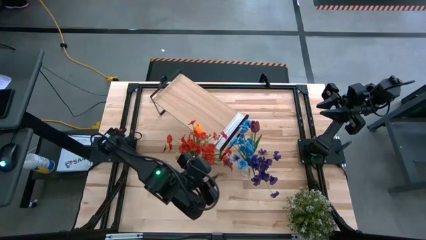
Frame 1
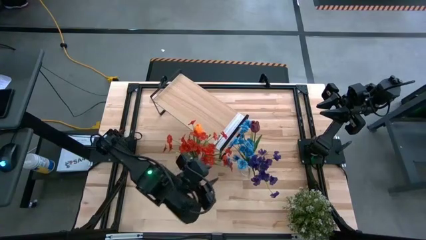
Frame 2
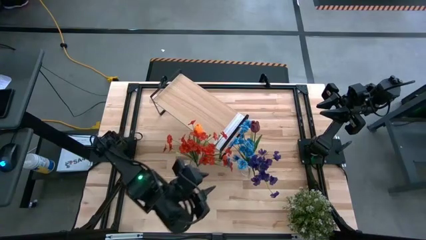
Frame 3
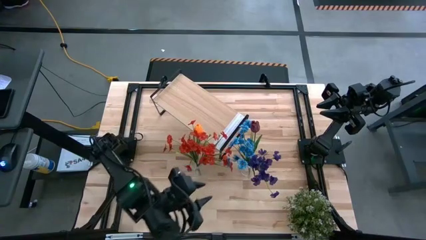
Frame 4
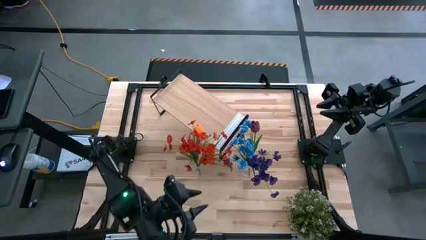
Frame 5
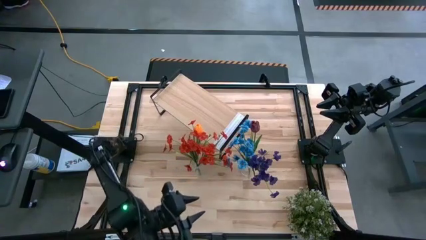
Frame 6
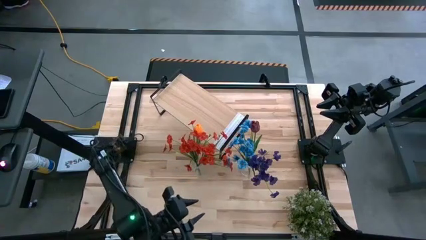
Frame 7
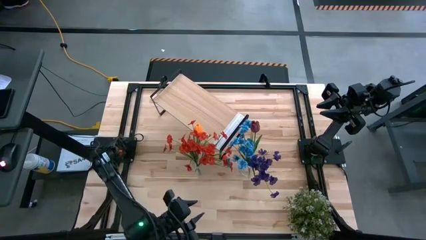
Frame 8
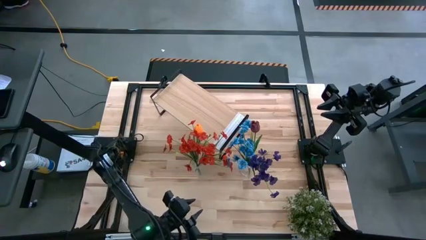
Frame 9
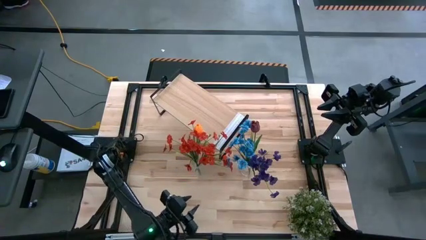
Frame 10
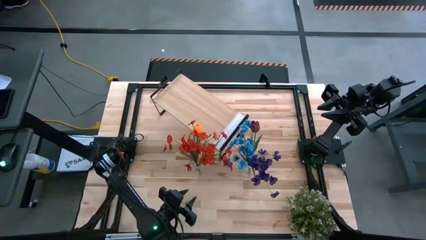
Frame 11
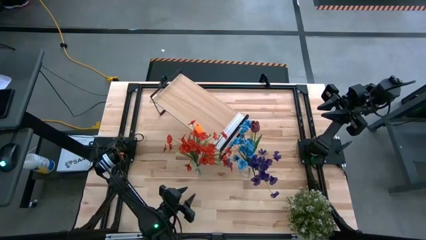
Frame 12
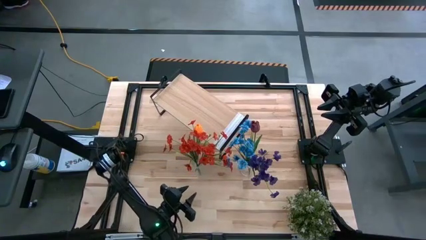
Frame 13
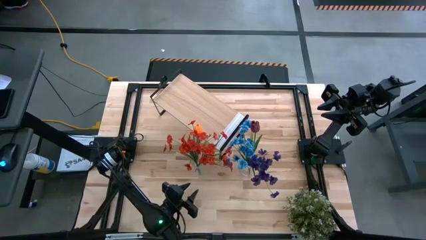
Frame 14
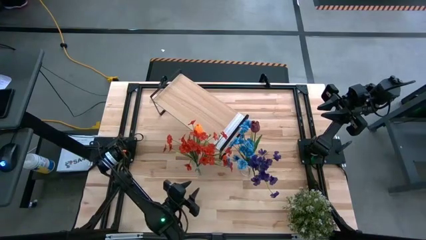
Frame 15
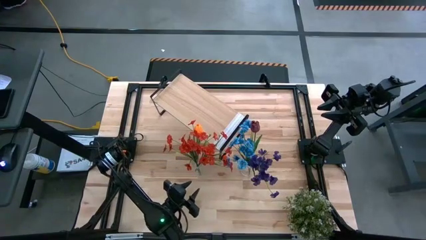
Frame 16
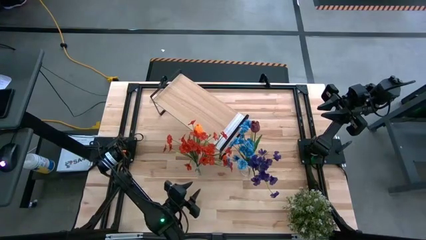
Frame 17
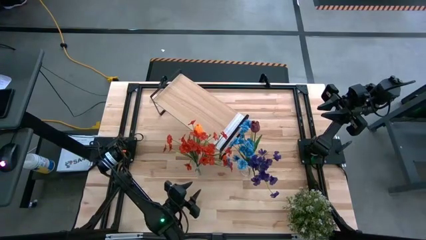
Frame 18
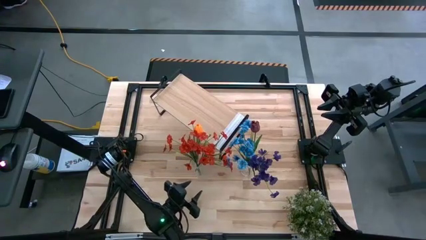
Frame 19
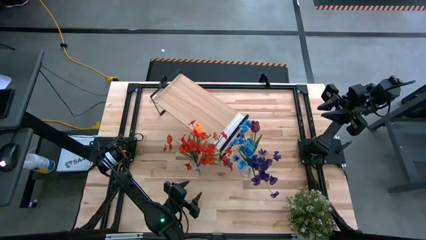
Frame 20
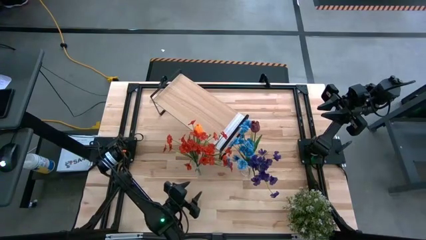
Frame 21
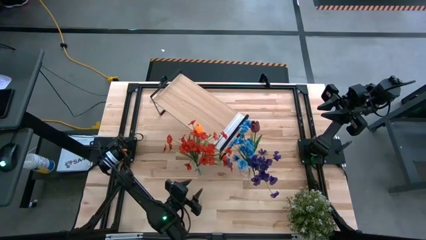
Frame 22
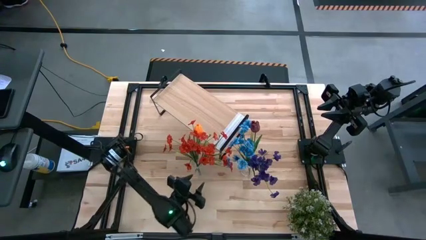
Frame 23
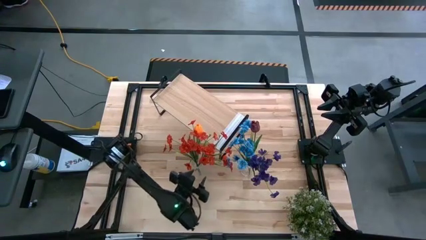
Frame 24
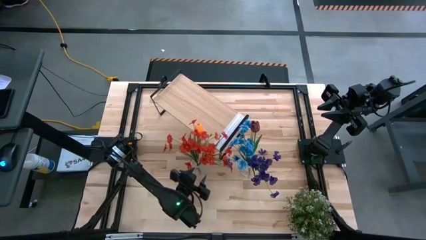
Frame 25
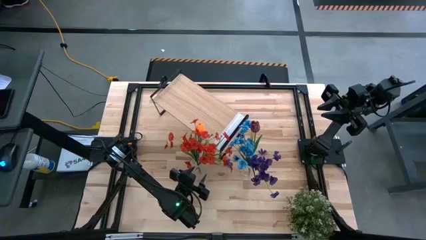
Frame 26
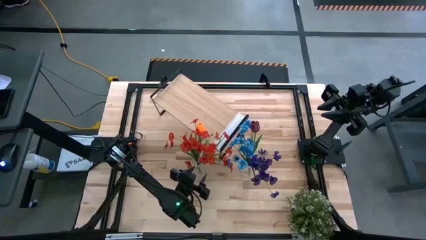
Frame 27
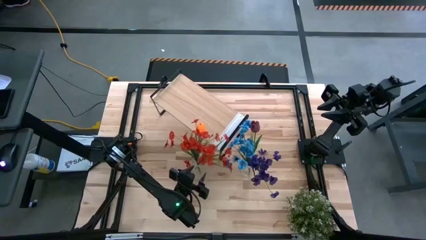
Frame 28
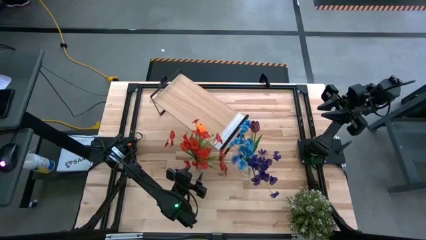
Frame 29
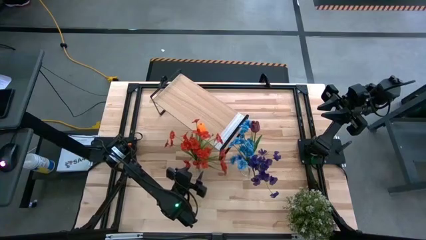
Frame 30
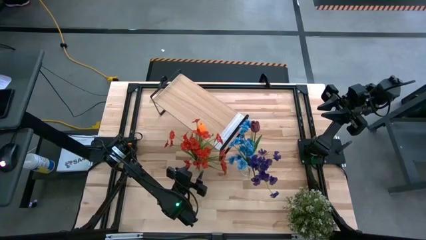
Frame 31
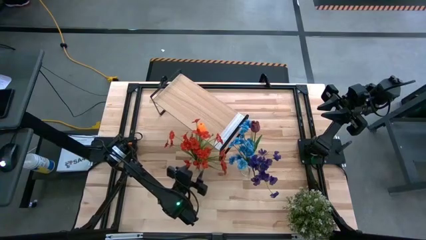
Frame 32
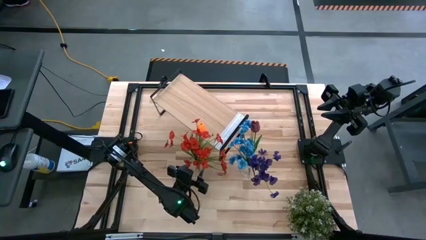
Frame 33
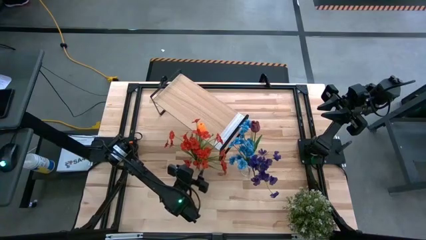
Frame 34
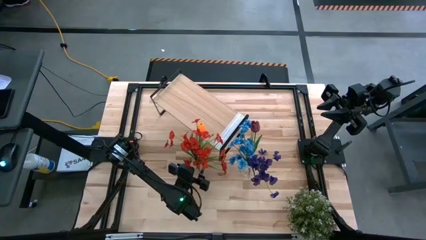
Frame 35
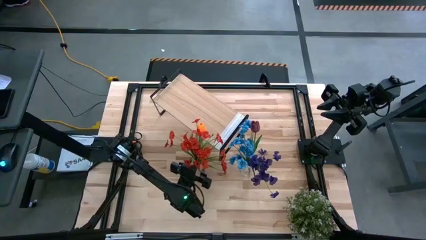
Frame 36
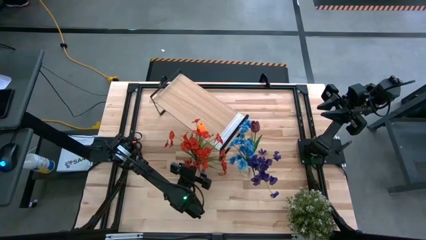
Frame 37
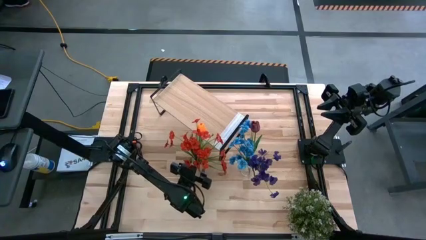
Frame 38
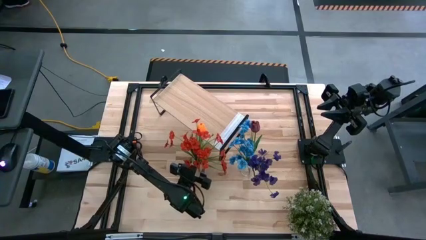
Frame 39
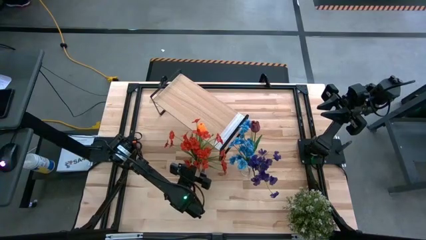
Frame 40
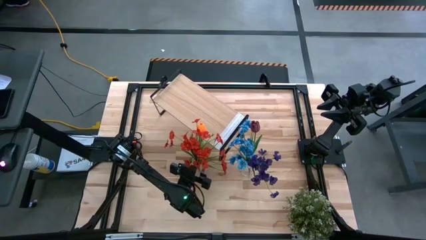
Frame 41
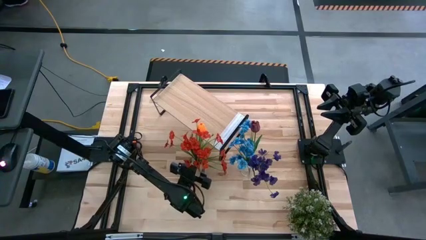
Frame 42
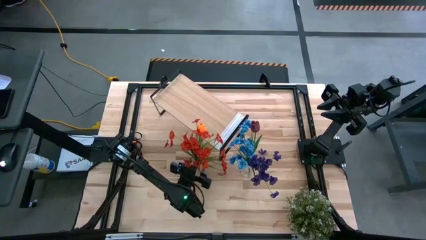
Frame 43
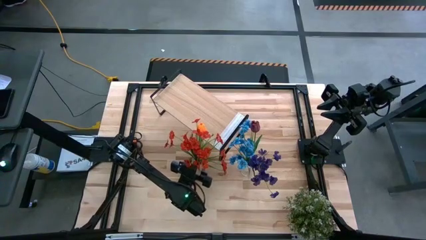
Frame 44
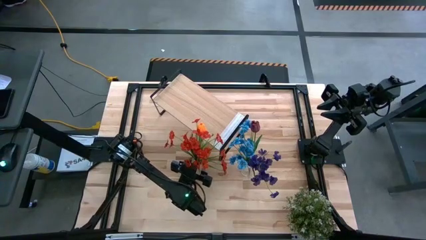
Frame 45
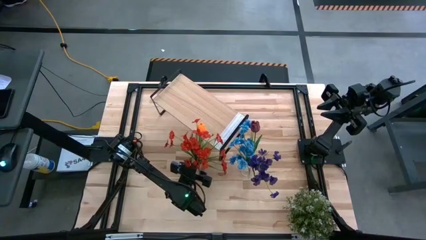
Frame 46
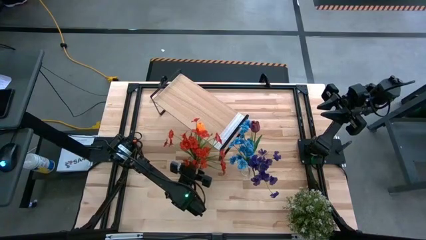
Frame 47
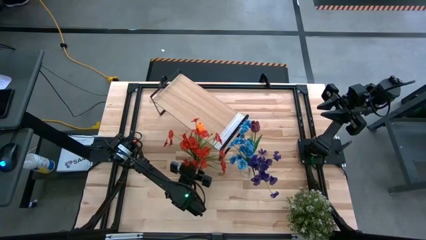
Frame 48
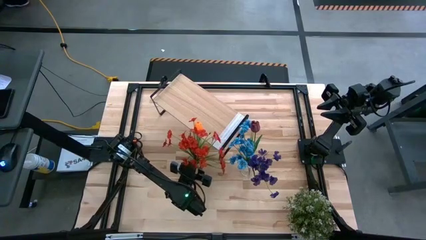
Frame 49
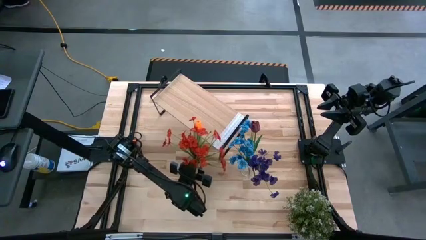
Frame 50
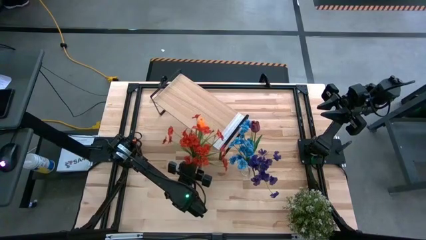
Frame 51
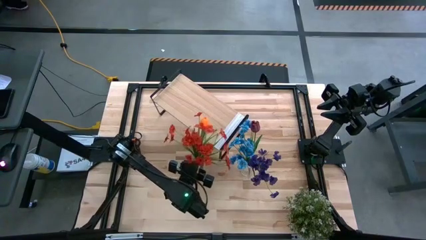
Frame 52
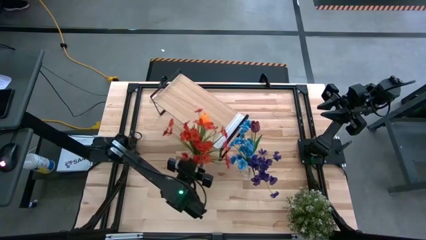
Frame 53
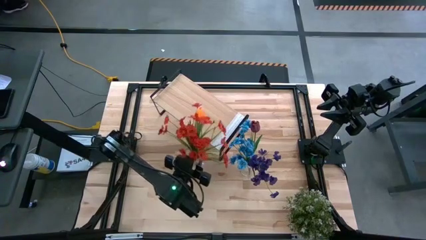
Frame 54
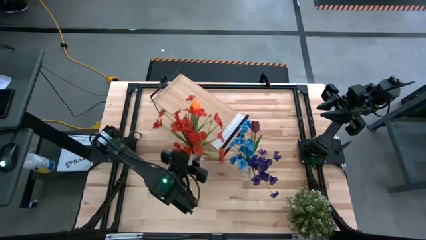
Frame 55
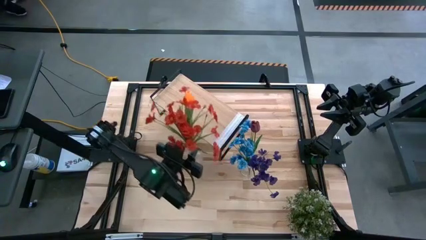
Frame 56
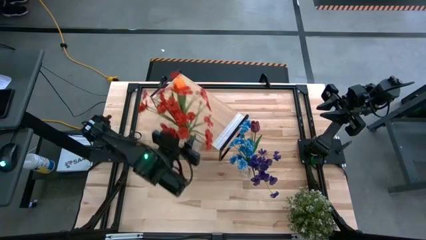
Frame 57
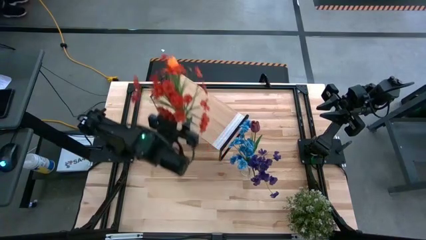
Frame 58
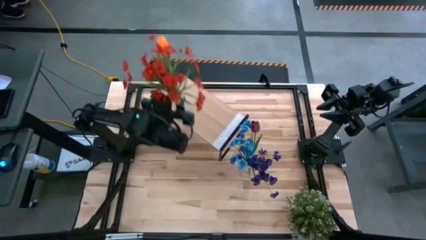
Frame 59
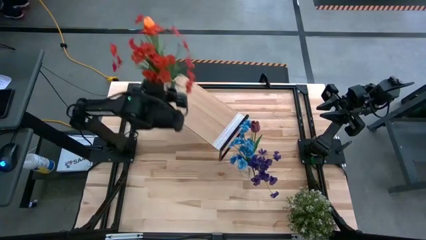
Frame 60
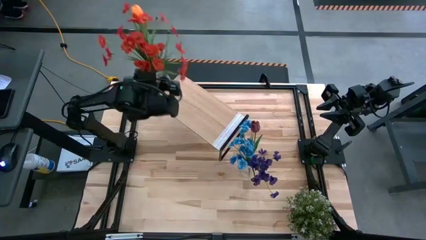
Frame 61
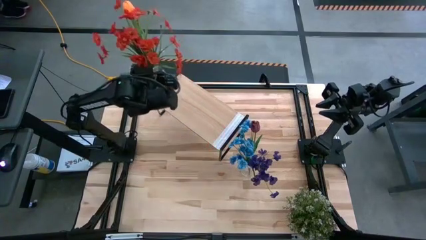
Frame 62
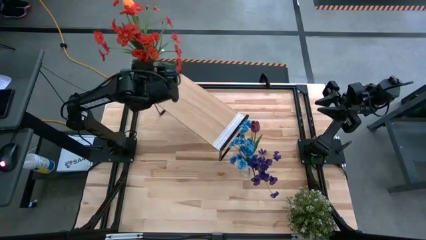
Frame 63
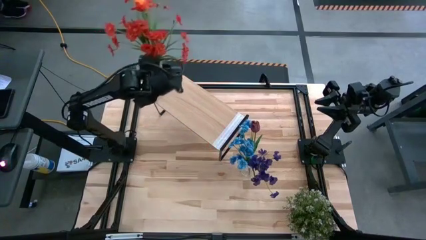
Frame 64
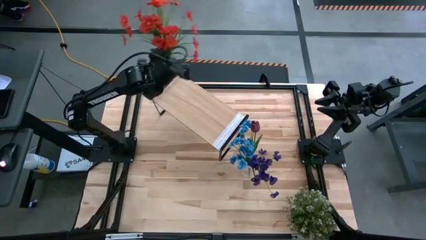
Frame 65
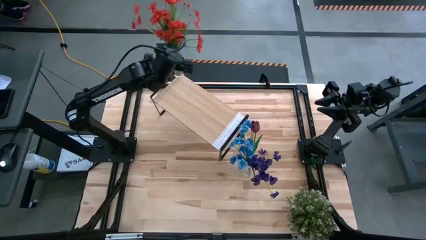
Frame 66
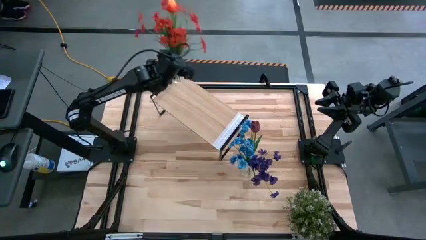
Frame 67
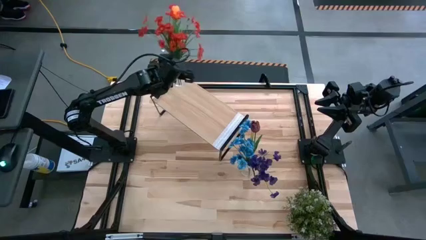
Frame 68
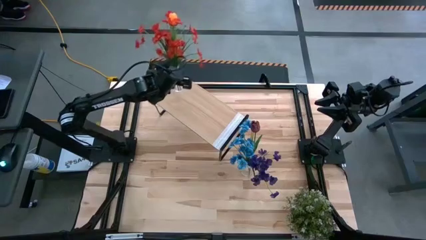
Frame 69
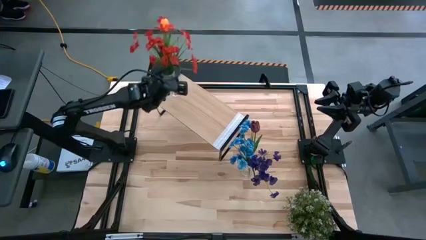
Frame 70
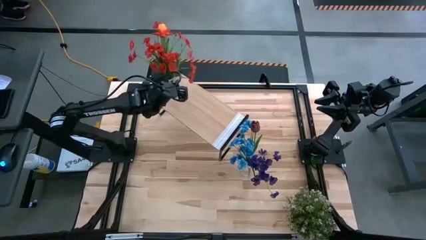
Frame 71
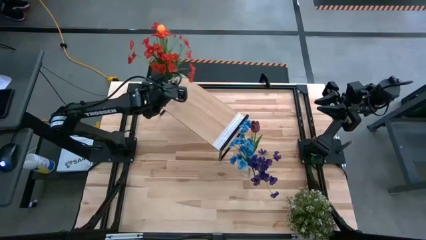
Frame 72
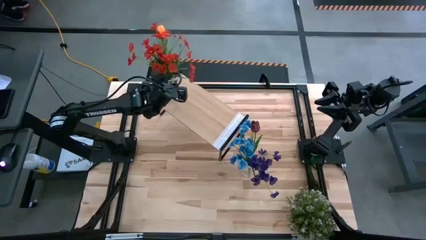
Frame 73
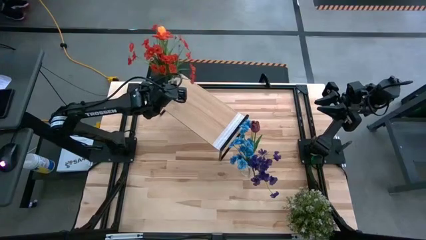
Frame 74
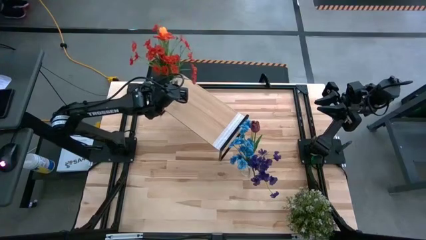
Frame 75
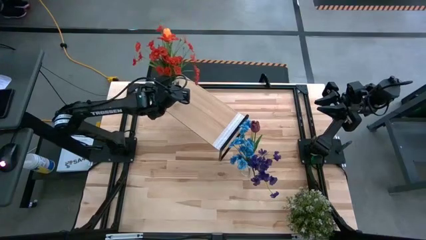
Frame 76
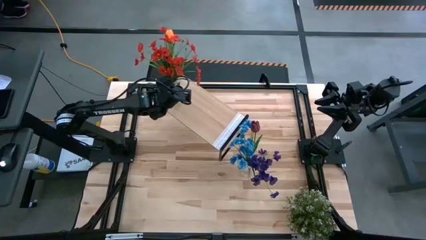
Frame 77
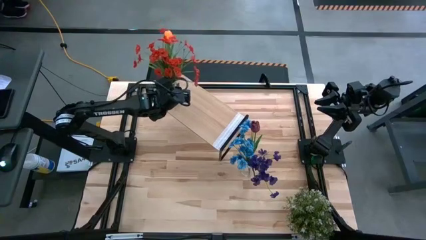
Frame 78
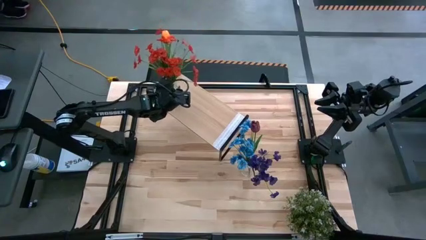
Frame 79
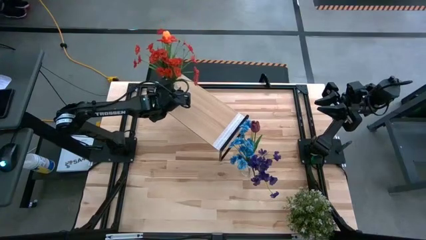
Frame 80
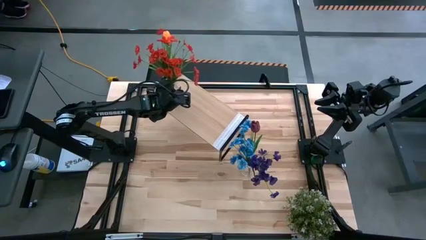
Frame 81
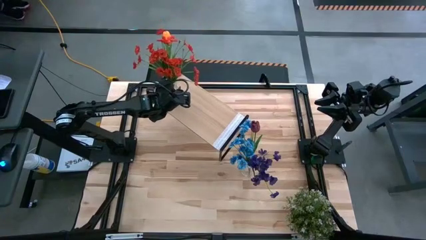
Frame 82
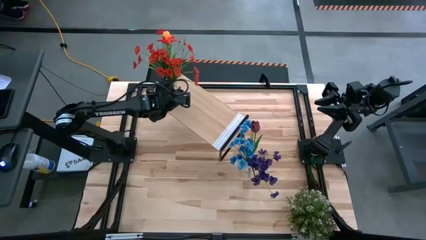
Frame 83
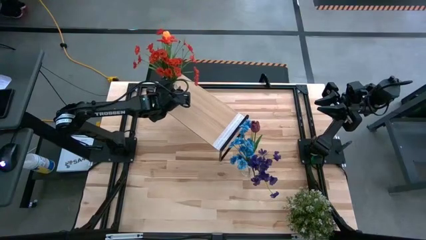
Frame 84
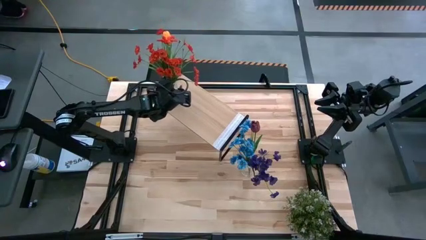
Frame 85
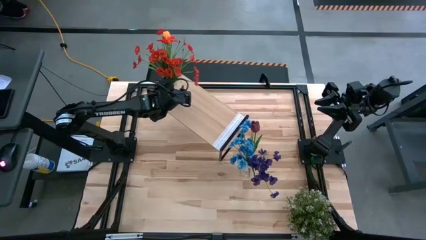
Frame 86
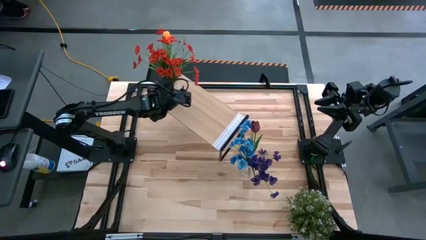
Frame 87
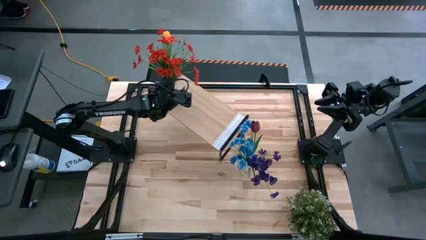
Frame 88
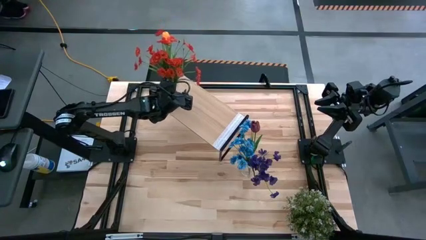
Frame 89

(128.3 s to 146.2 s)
Task: Pick and place flowers into a vace then onto a shelf
Put the left transparent flower vase on the shelf
